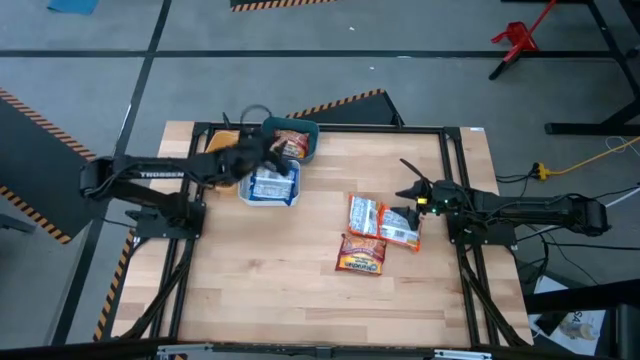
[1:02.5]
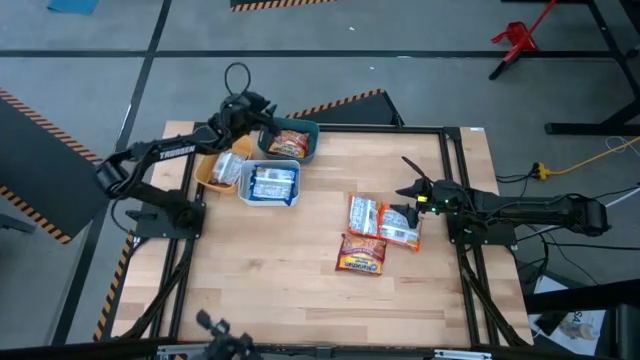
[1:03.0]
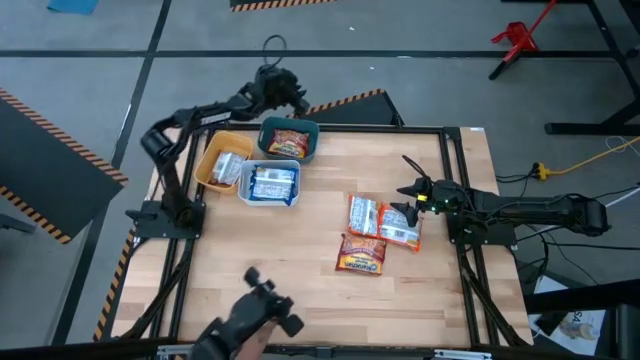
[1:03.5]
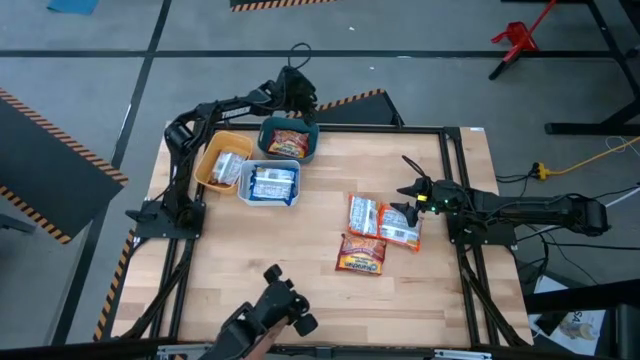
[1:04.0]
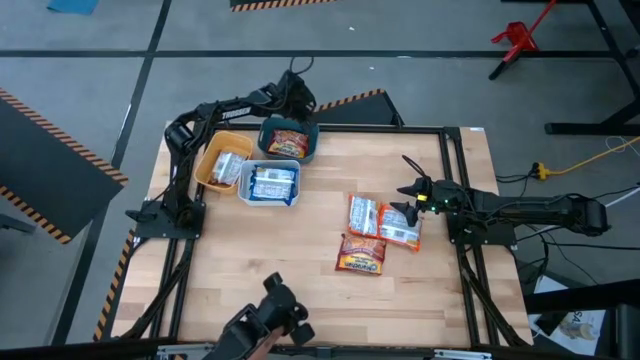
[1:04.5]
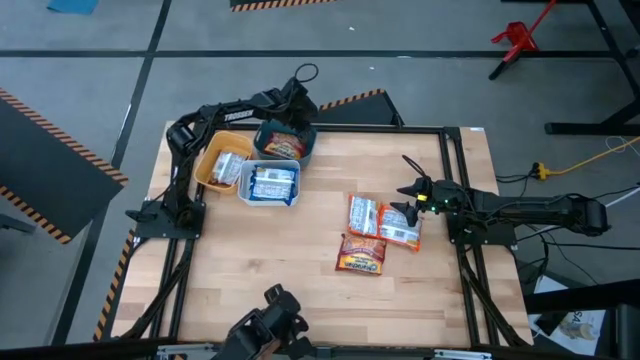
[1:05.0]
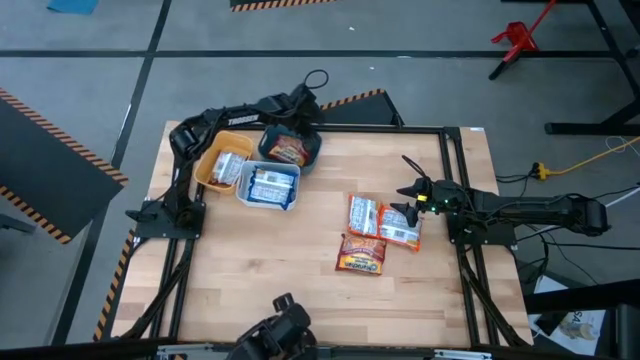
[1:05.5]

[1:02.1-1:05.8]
Task: Sort Maruchan noodles
Adjust the blue bin

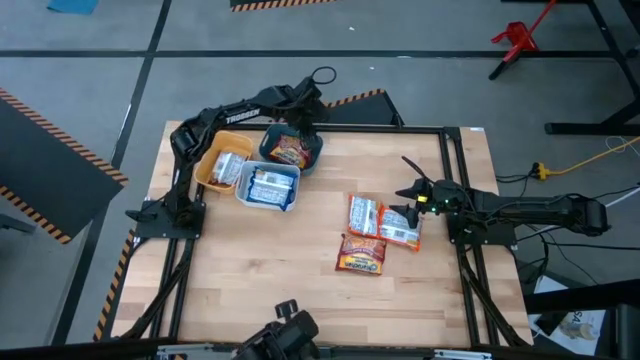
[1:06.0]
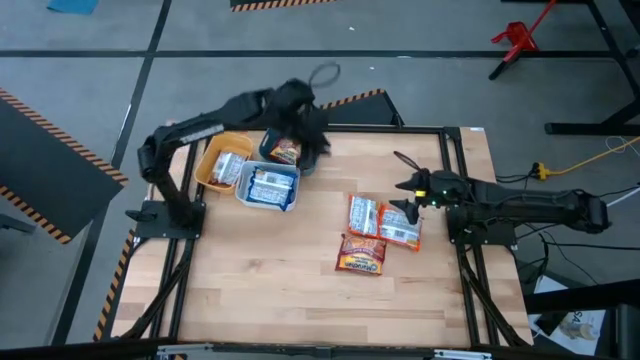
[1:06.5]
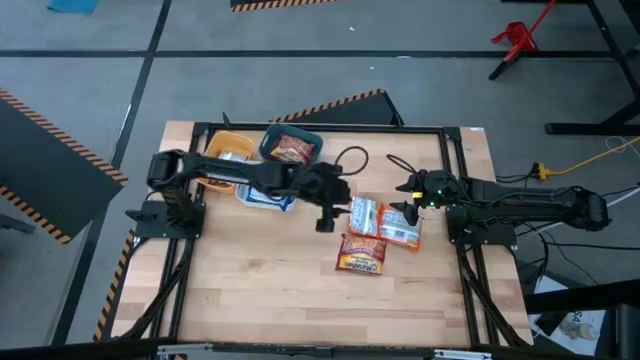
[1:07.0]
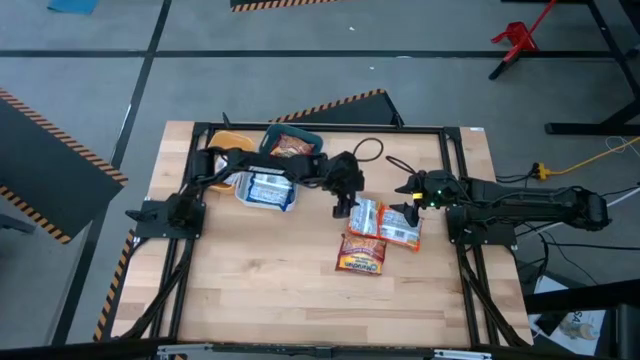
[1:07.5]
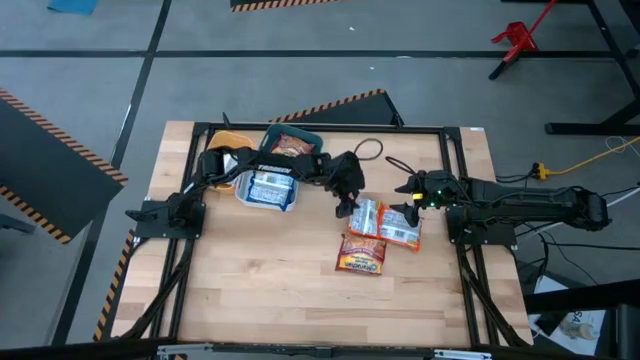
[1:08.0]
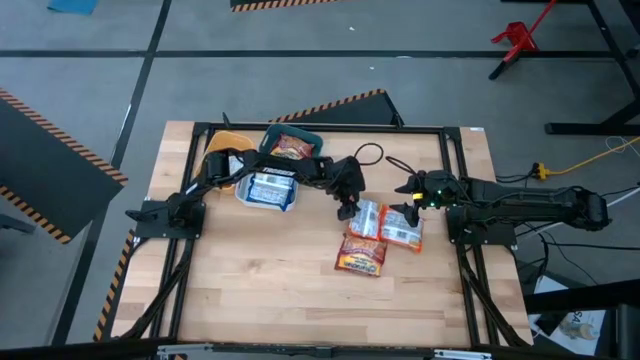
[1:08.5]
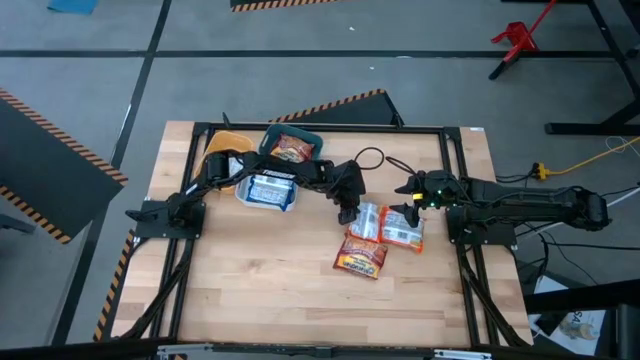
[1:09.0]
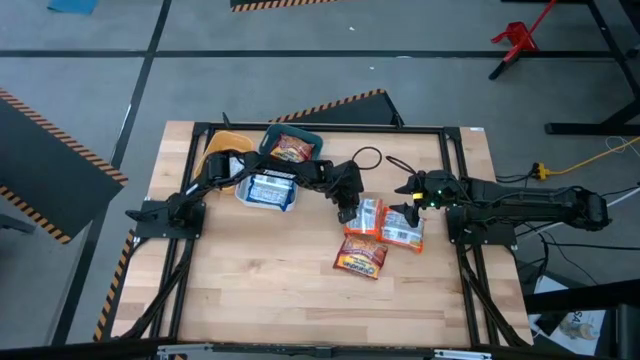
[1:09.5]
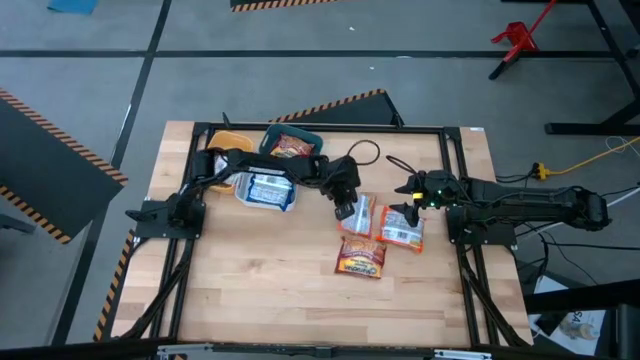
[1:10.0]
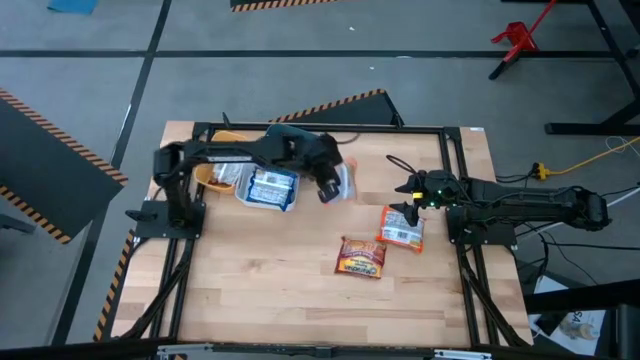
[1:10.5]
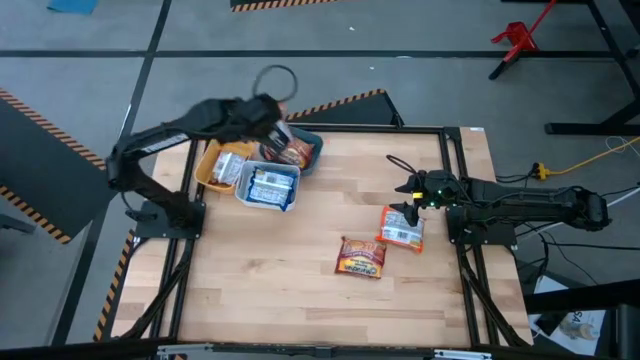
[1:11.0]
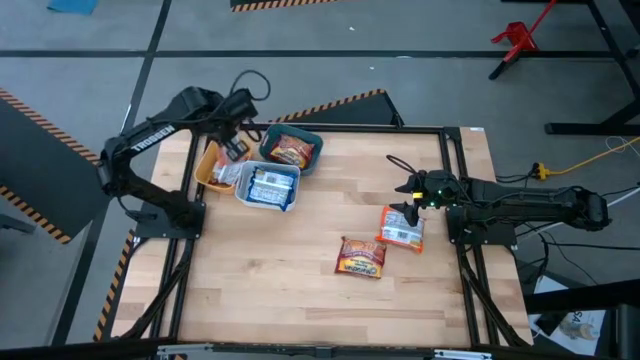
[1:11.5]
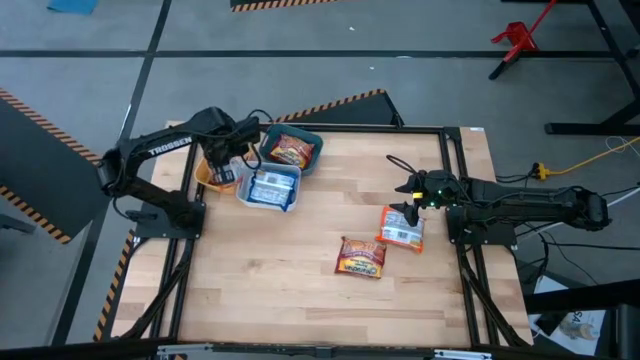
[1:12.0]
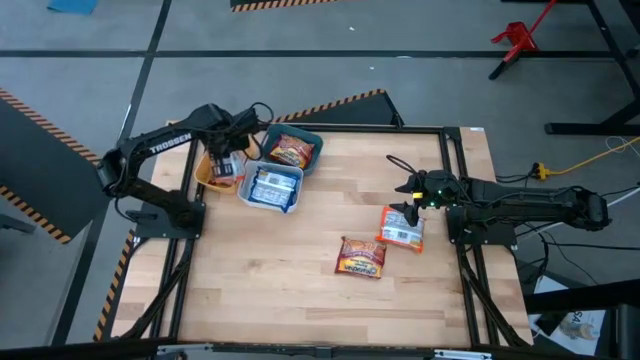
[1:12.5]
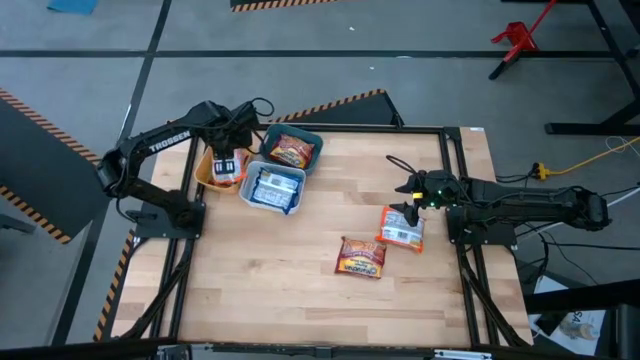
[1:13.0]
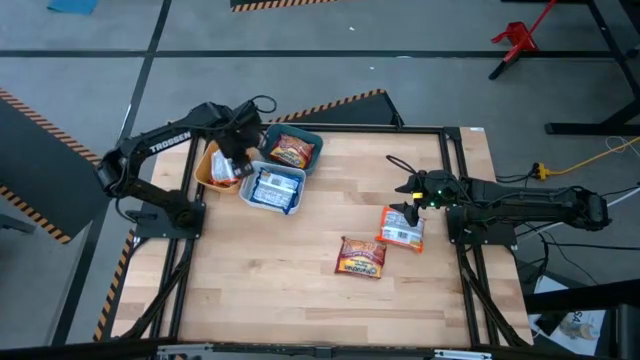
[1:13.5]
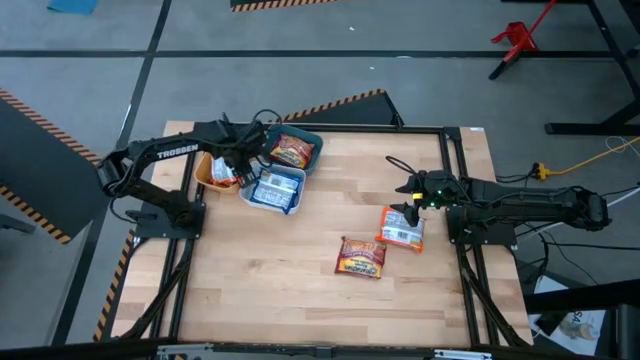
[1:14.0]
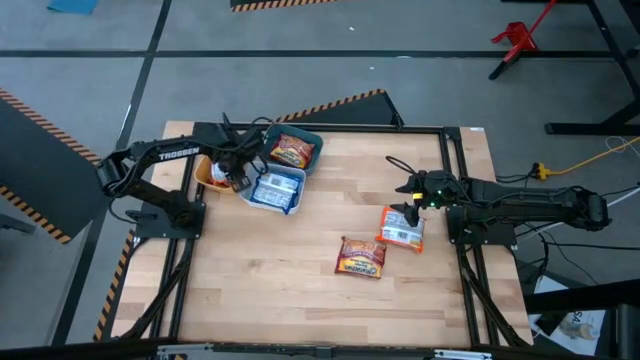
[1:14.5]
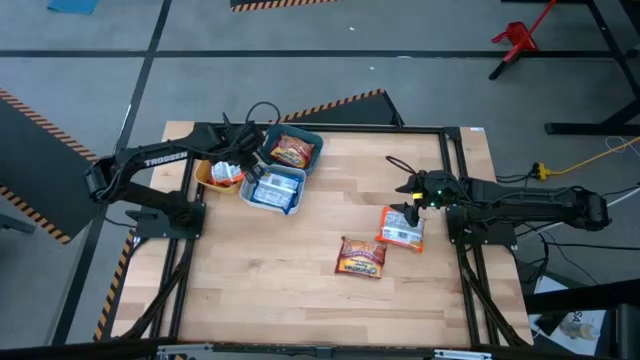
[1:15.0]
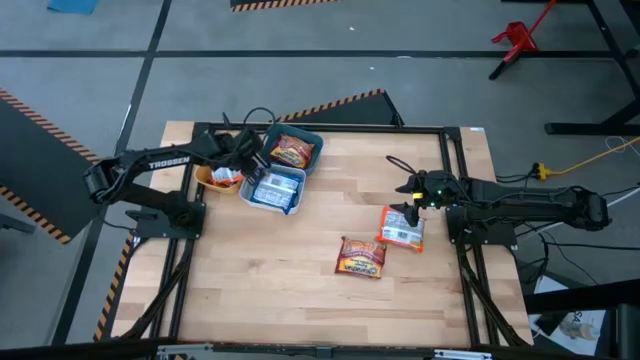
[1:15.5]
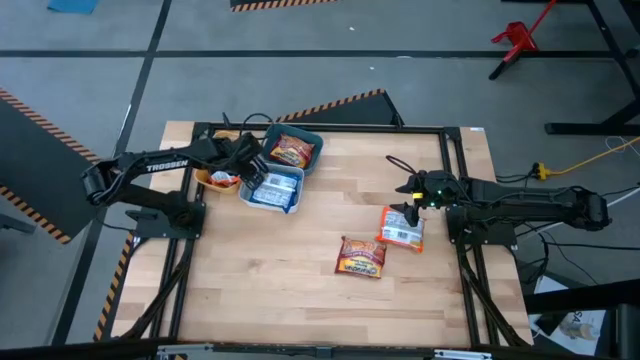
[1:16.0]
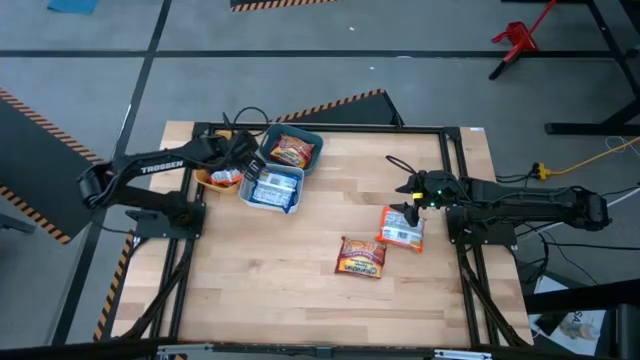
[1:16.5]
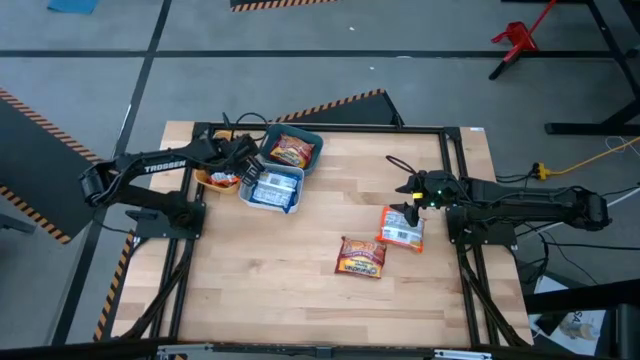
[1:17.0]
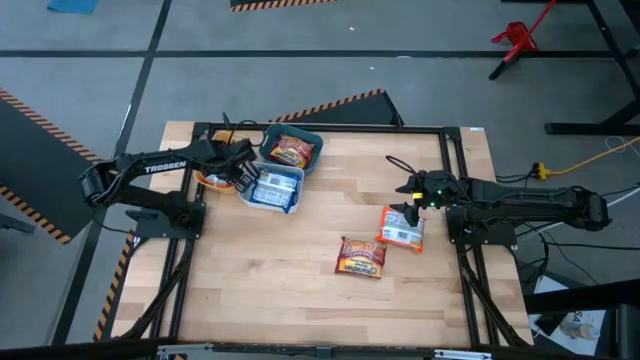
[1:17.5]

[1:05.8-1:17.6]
Put the left orange noodle into the yellow bin

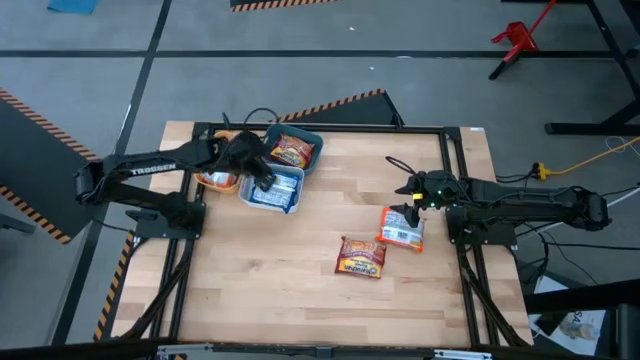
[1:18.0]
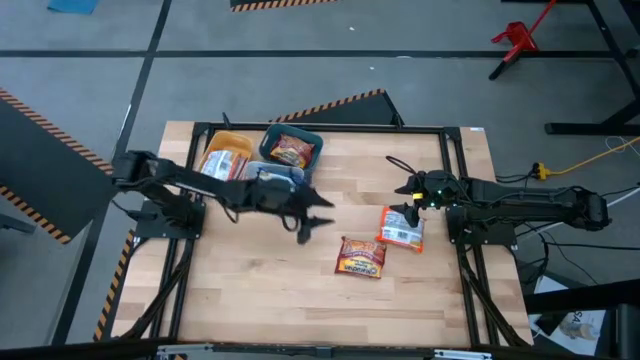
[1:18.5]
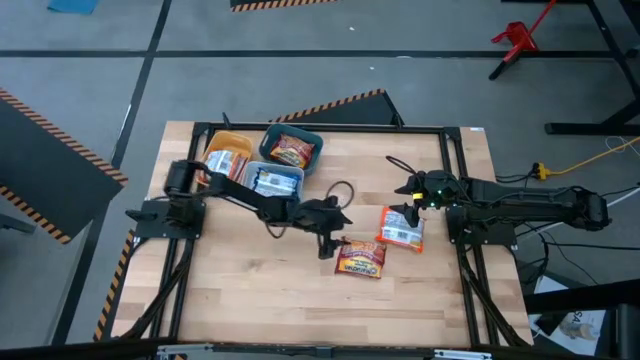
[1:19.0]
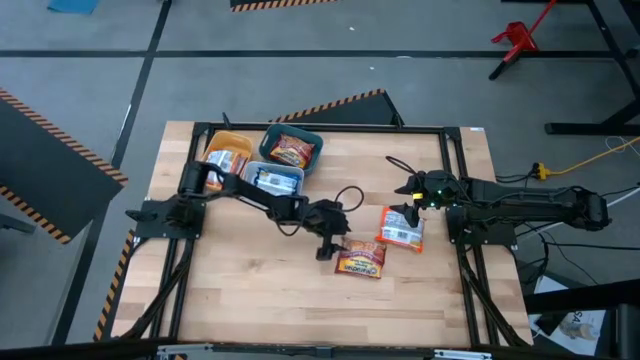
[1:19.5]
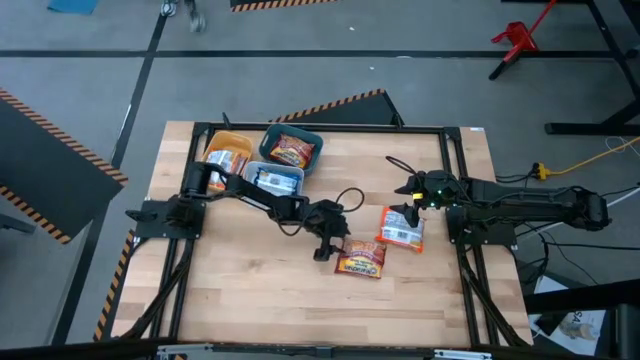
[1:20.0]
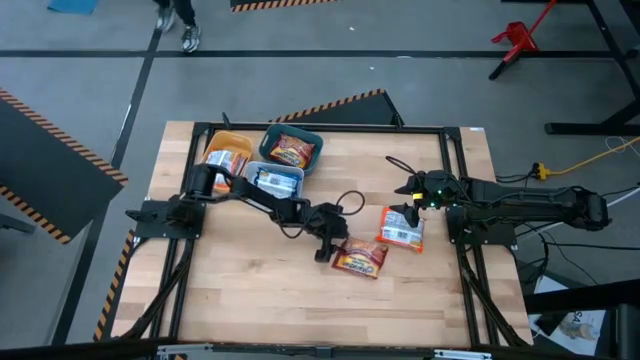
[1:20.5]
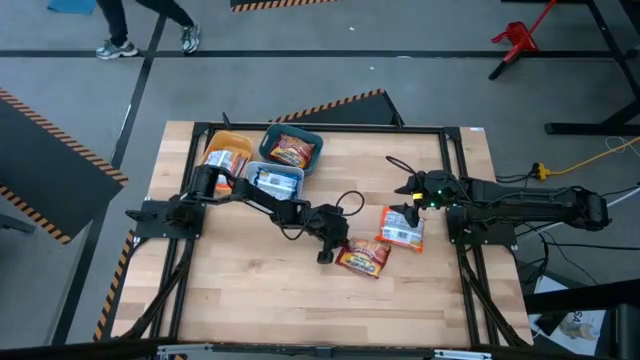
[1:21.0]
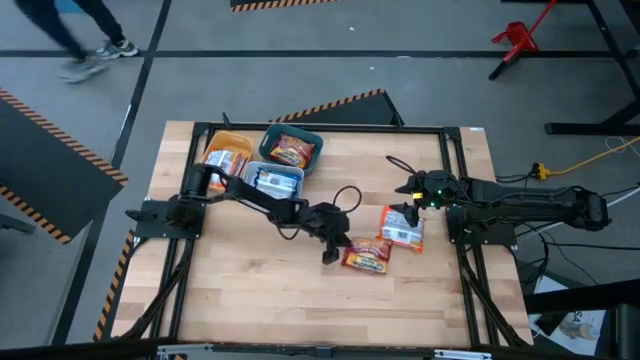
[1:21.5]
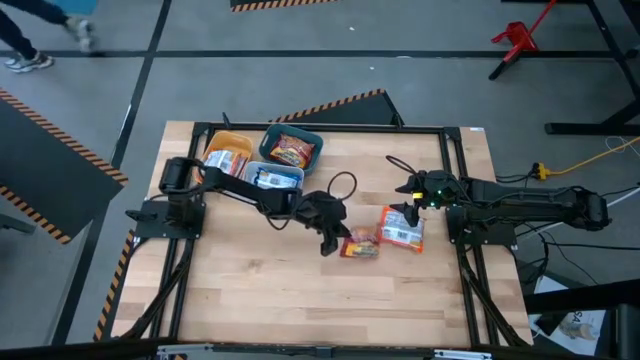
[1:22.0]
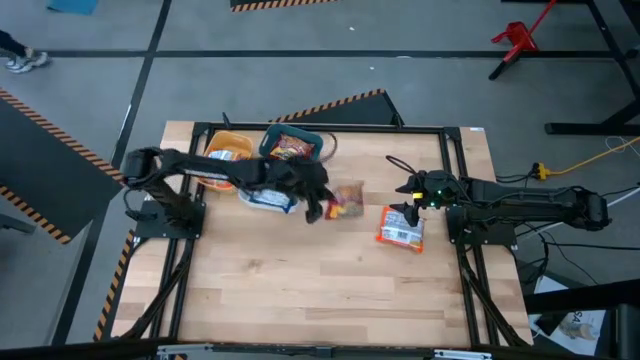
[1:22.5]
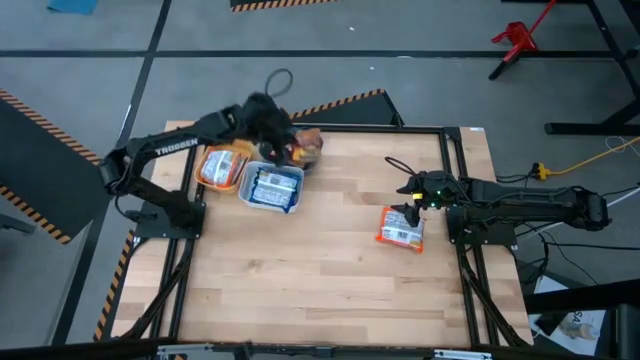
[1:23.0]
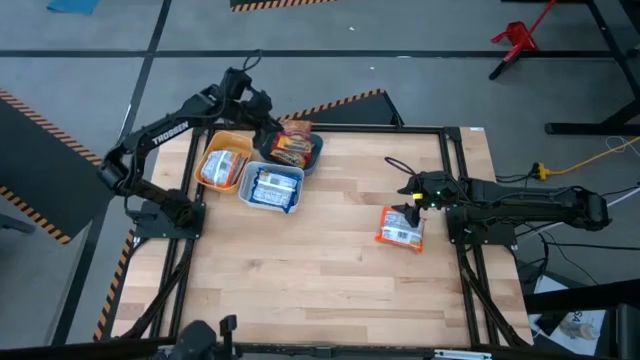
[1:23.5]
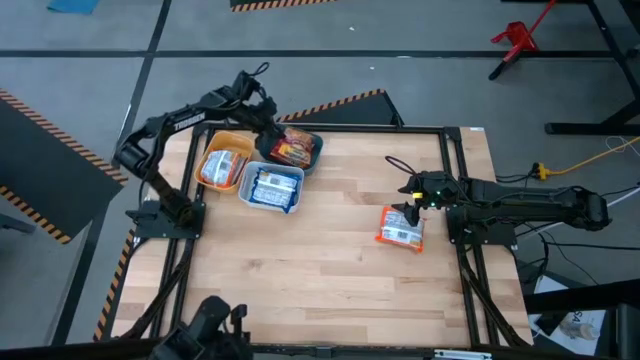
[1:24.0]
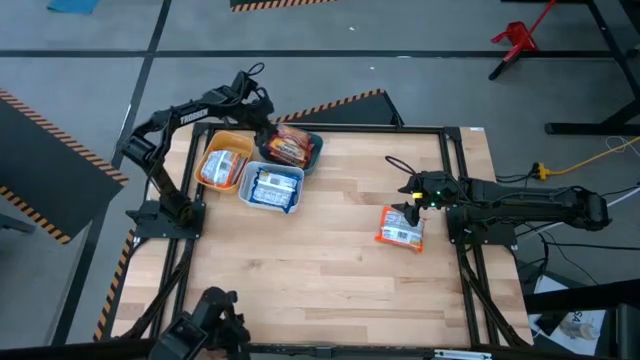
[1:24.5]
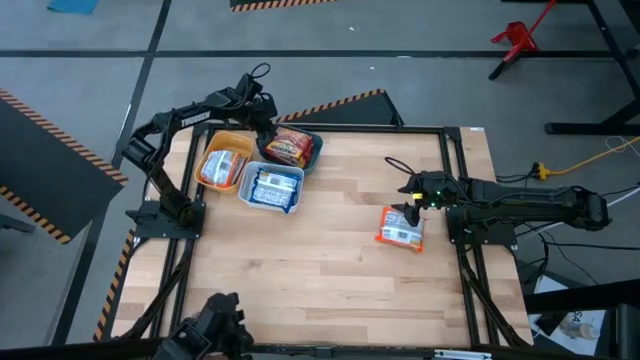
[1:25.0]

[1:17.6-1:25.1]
Put the red noodle into the blue bin
